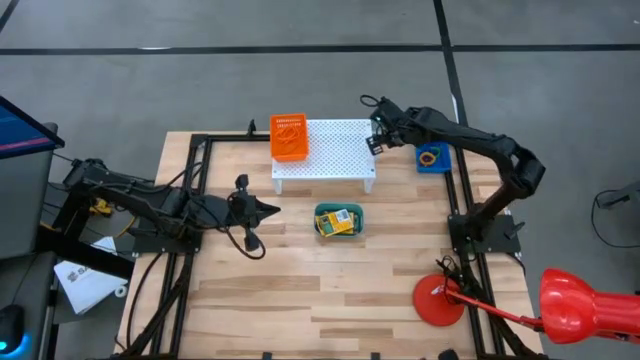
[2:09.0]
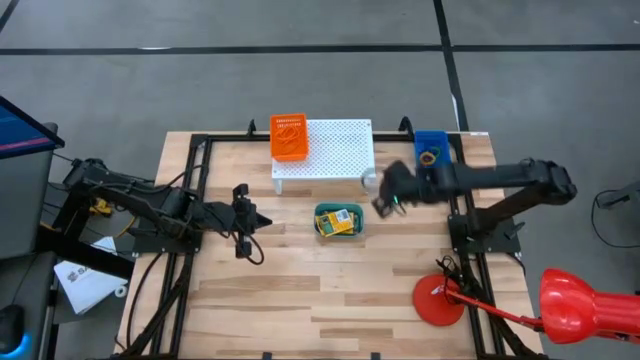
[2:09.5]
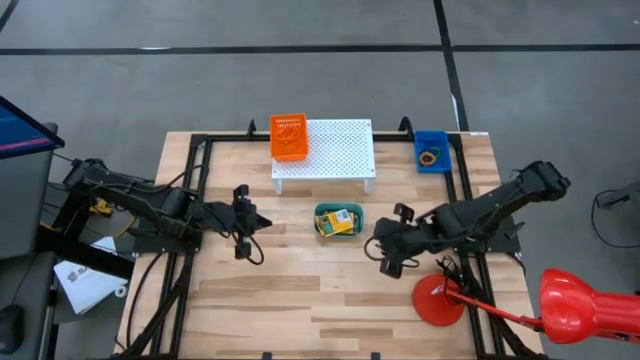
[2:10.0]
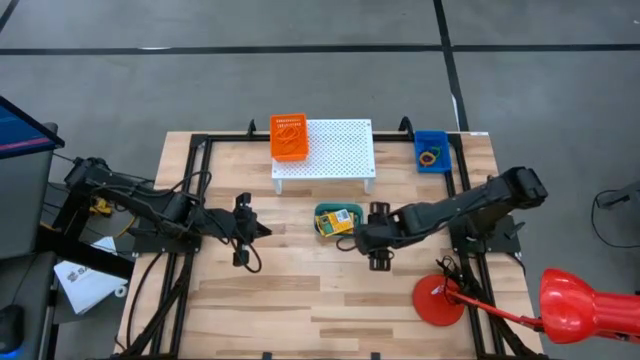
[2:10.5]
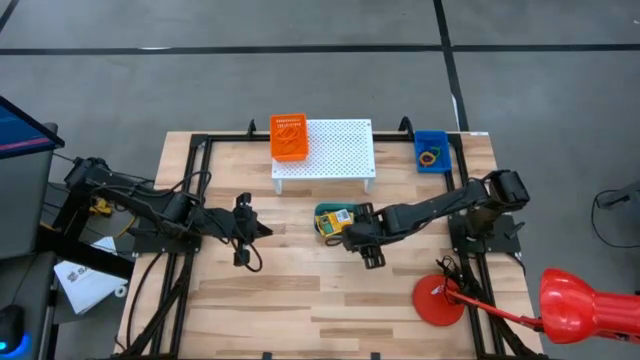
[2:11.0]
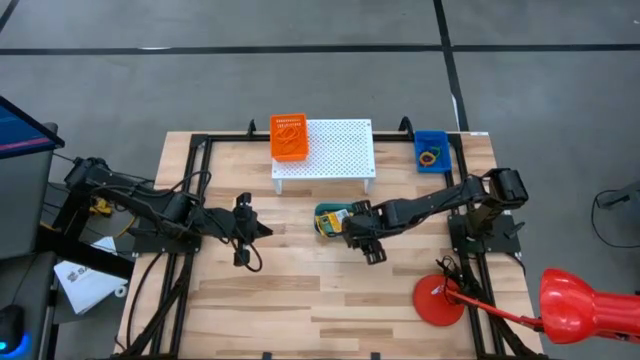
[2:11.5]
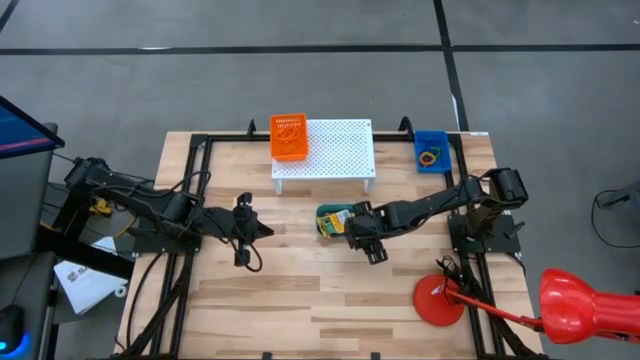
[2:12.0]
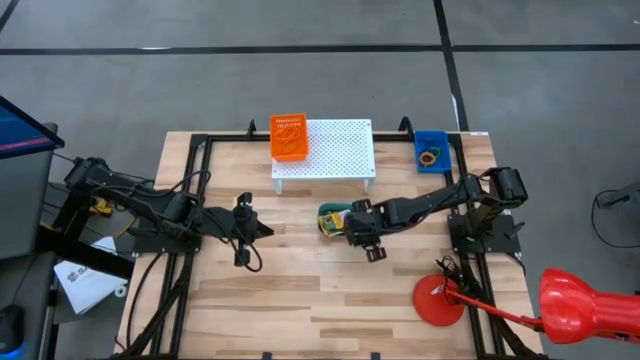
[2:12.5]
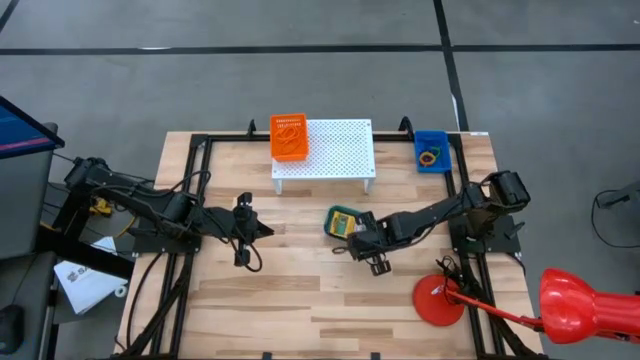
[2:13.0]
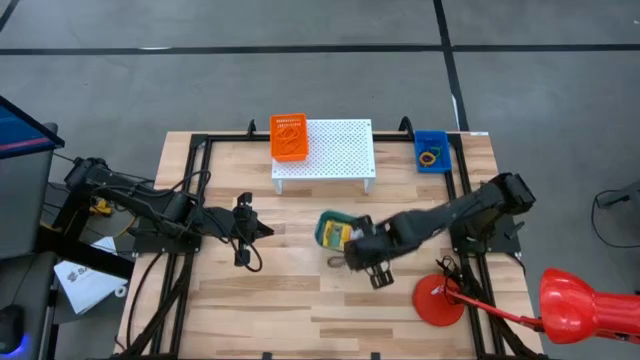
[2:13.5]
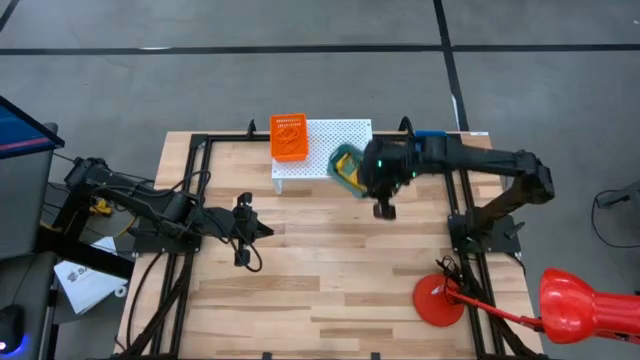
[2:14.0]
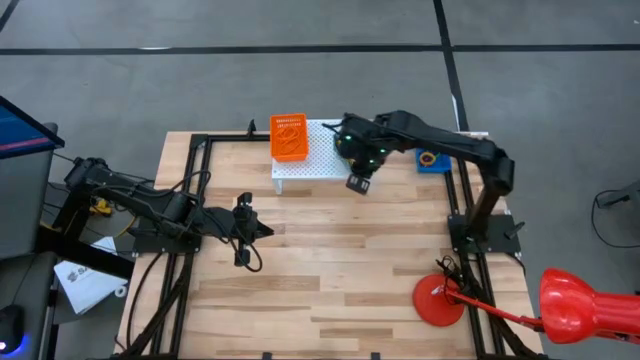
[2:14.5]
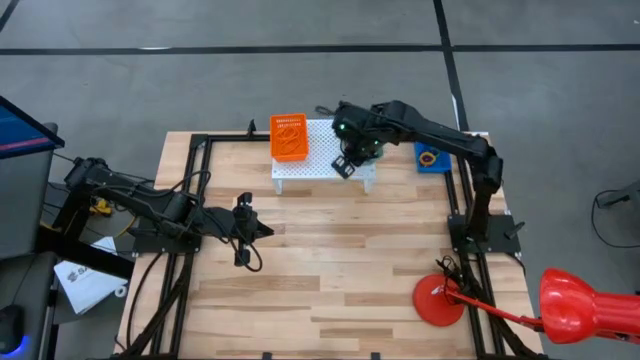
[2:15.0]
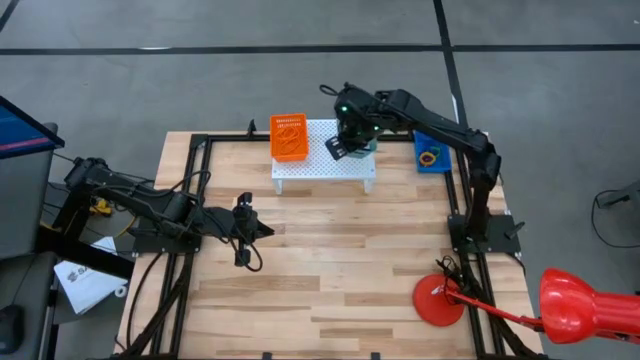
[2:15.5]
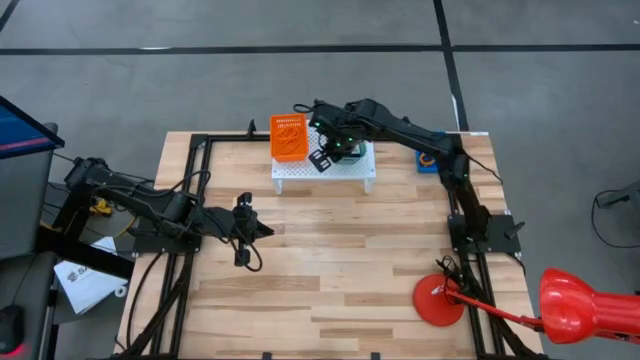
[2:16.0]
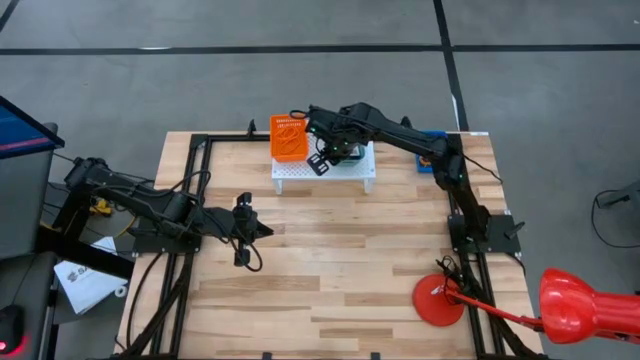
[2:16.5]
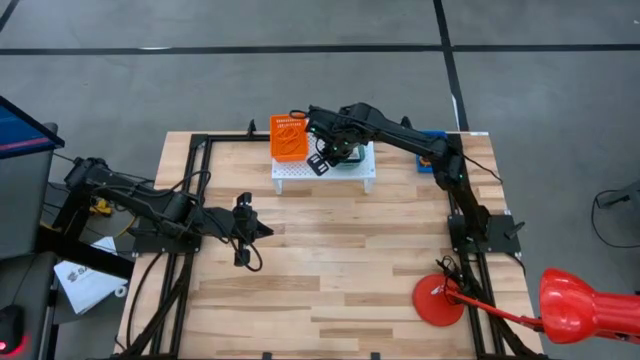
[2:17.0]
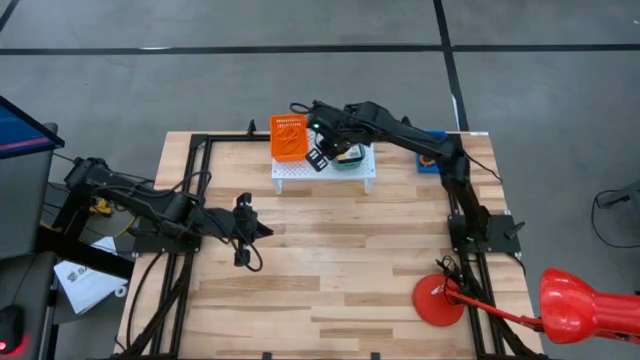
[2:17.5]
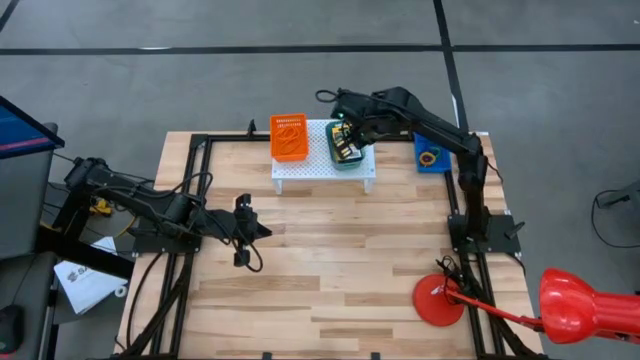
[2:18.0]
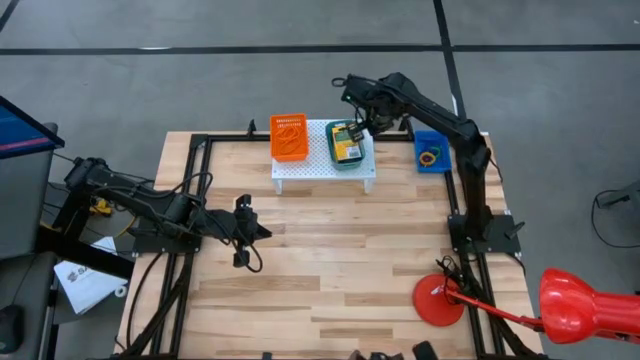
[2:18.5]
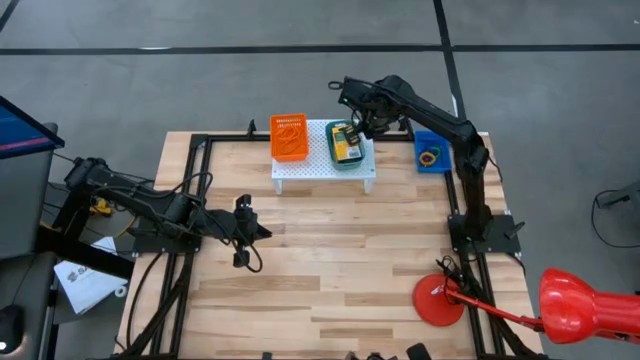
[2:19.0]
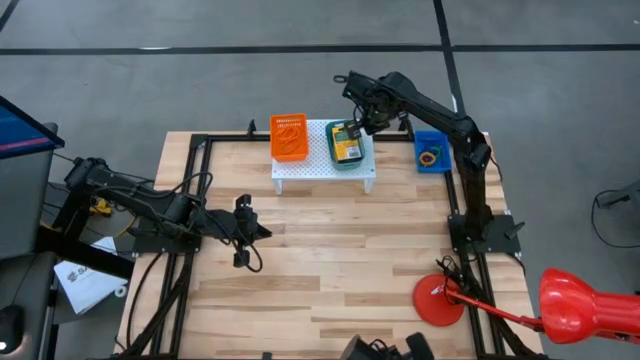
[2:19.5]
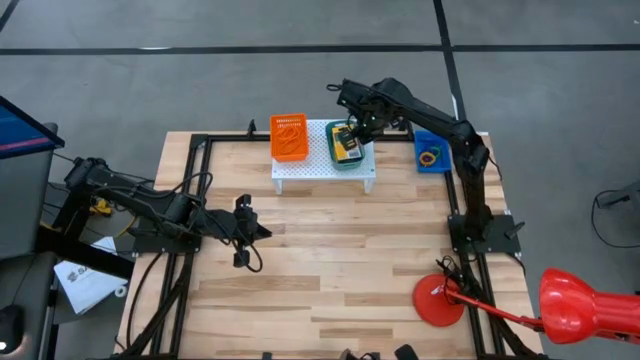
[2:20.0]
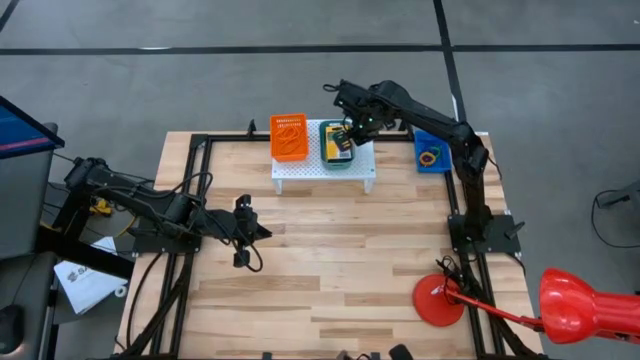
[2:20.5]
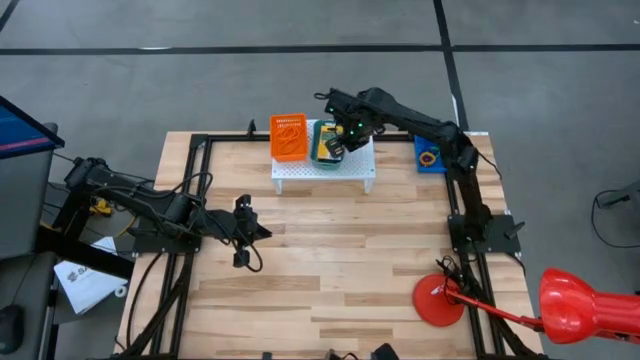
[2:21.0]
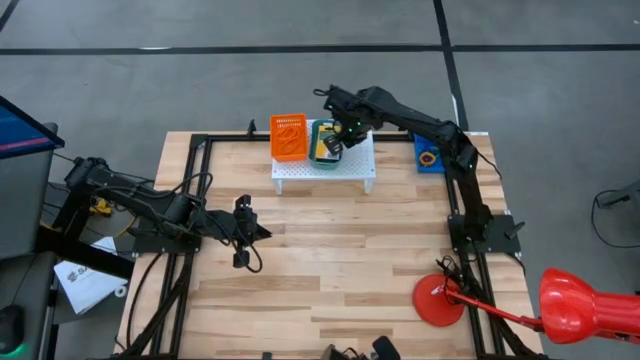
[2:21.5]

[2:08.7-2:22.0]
Task: Pick & Place Office Desk Supplies
Put the green bin on the shelf

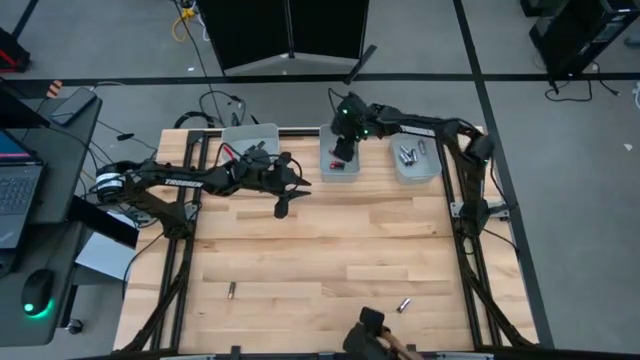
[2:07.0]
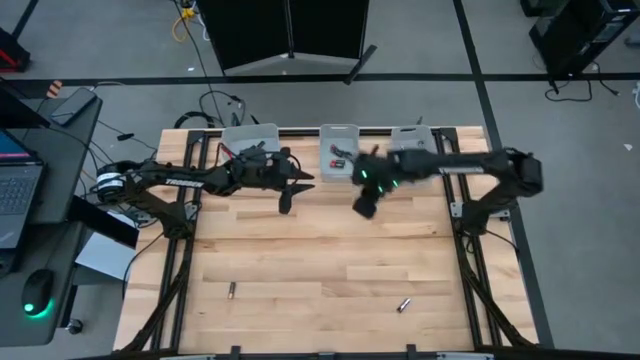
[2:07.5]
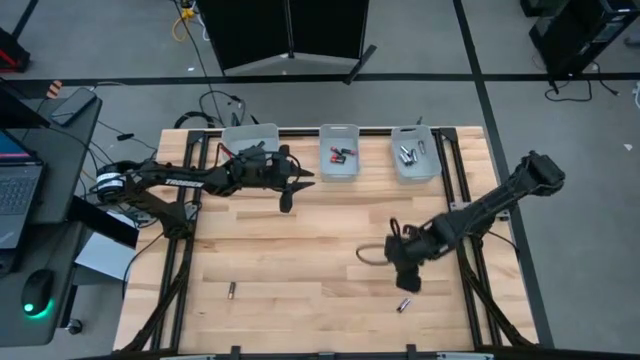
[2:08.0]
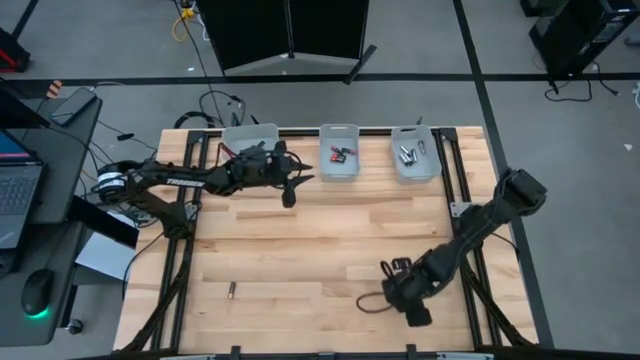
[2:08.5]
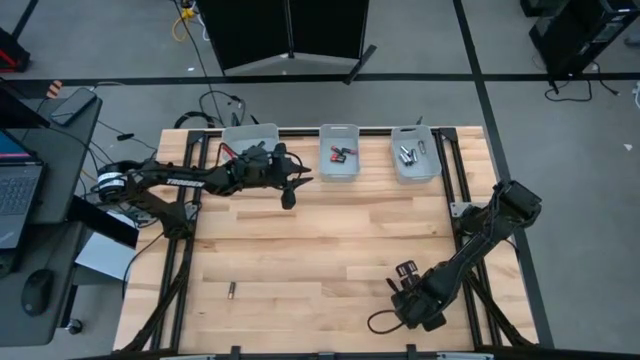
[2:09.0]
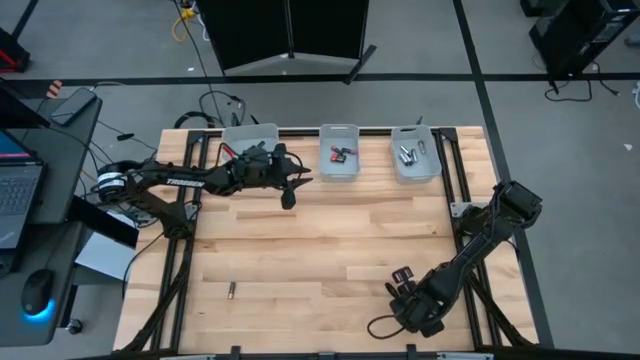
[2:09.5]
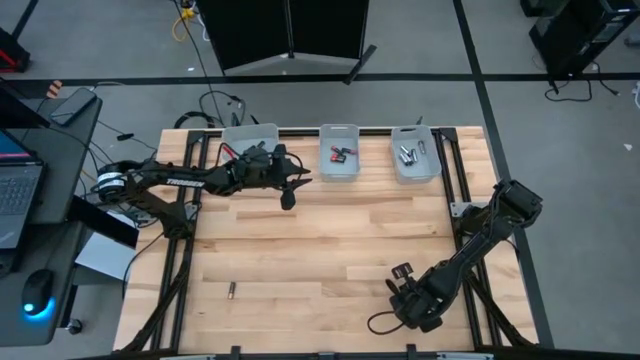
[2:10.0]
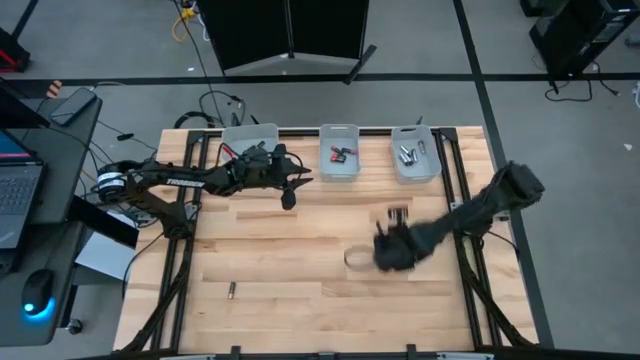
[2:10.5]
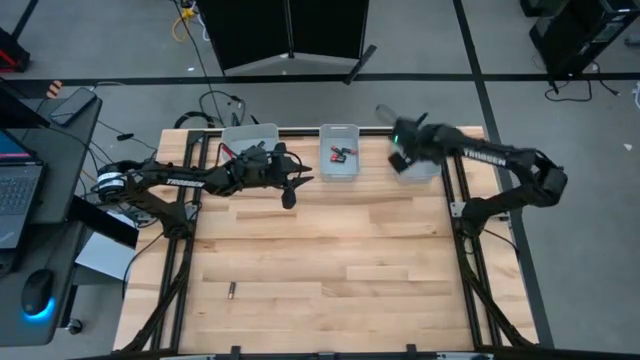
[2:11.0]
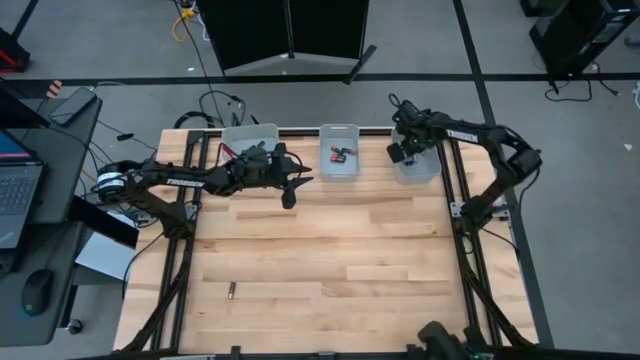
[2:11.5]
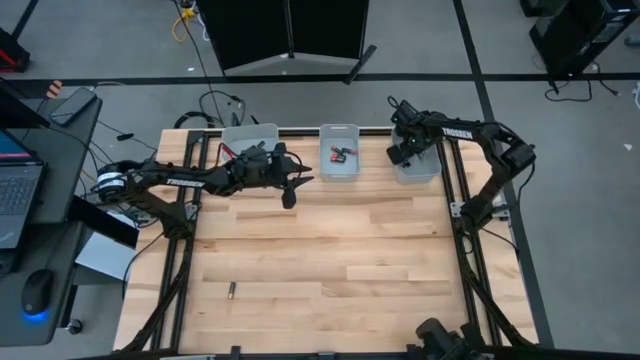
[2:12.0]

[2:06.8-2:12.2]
Task: Sort batteries
Put the black silver battery into the right bin
